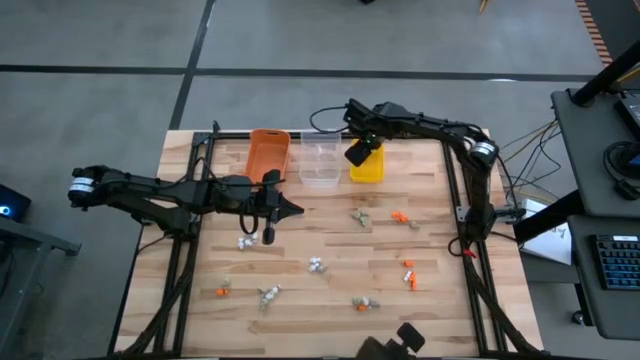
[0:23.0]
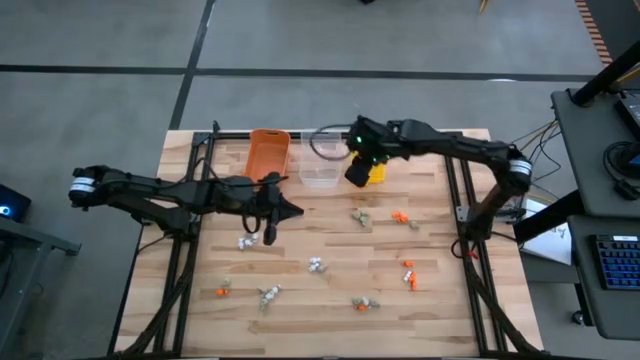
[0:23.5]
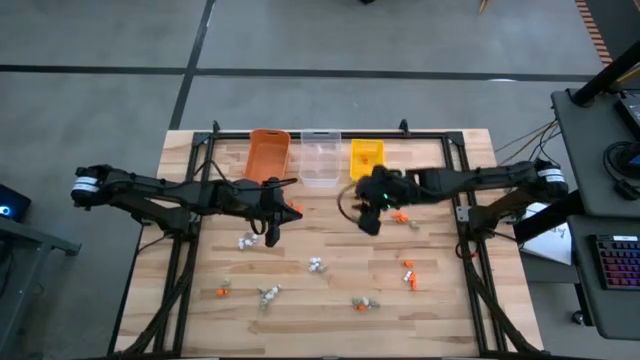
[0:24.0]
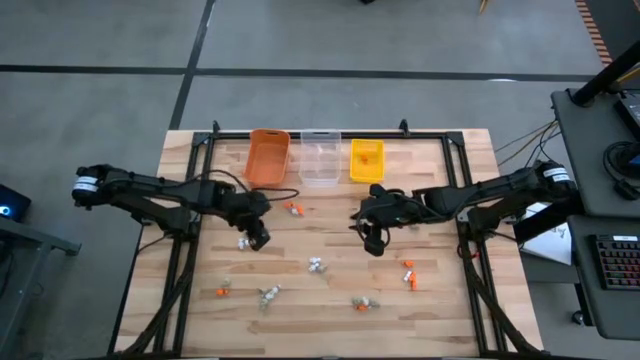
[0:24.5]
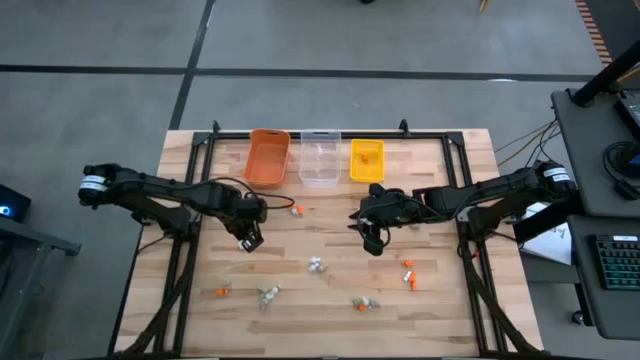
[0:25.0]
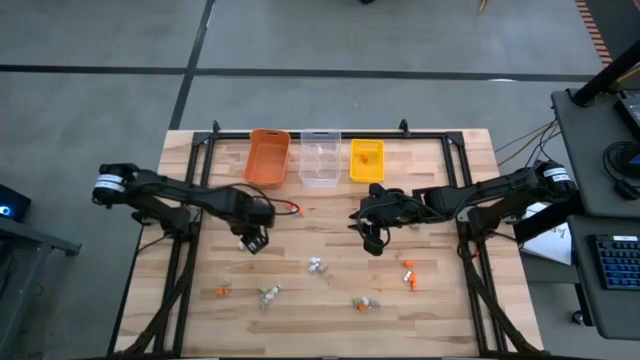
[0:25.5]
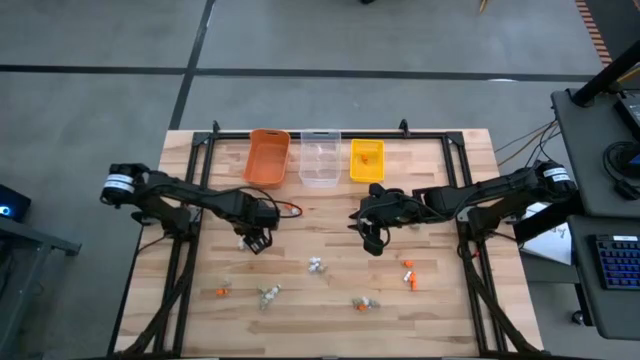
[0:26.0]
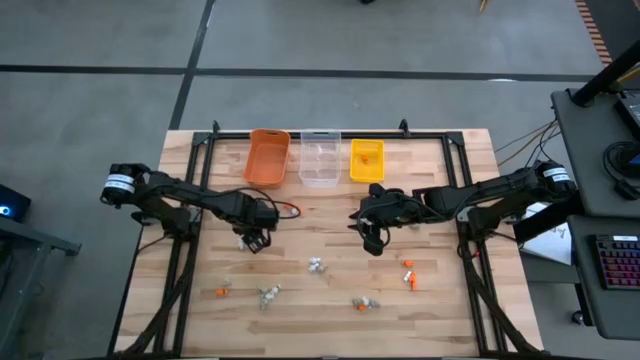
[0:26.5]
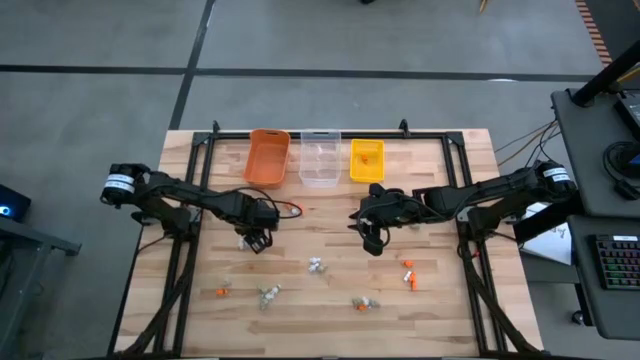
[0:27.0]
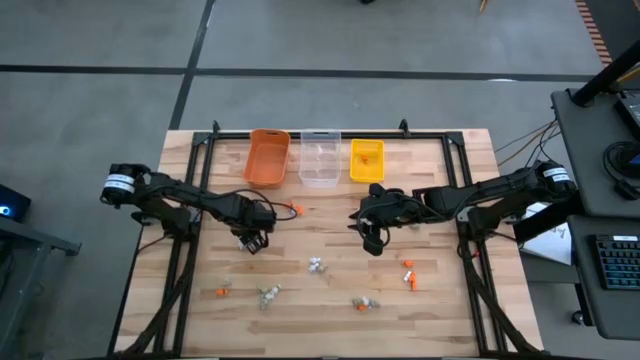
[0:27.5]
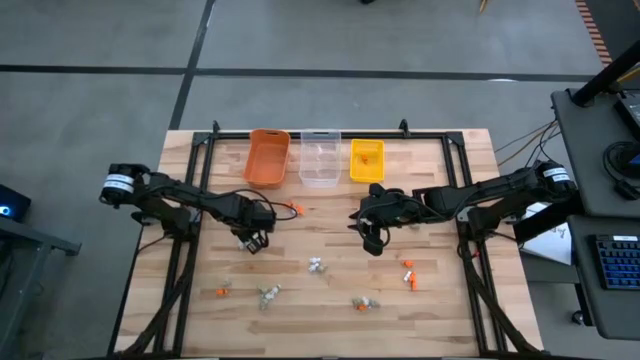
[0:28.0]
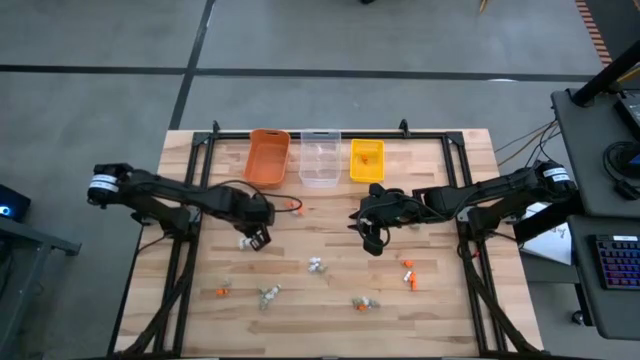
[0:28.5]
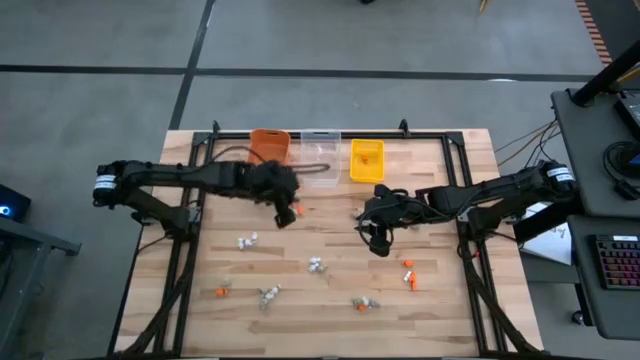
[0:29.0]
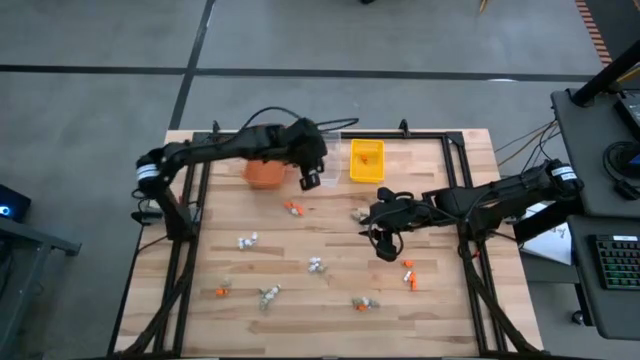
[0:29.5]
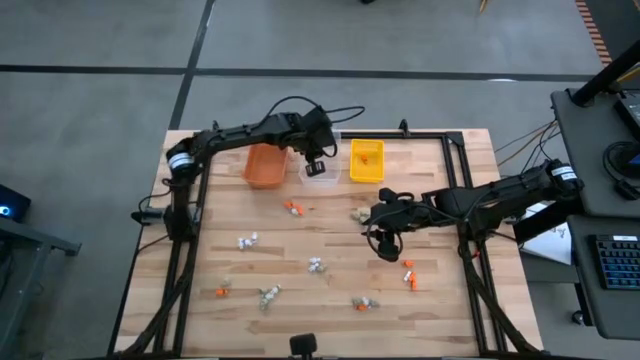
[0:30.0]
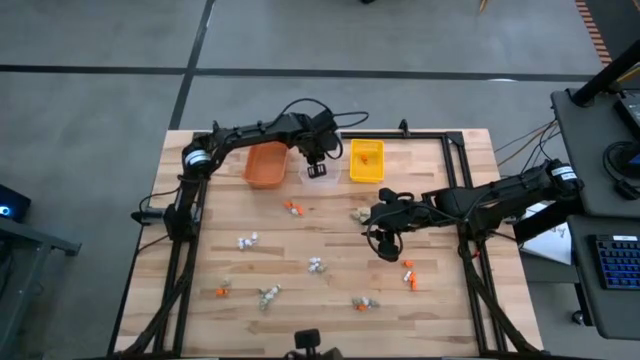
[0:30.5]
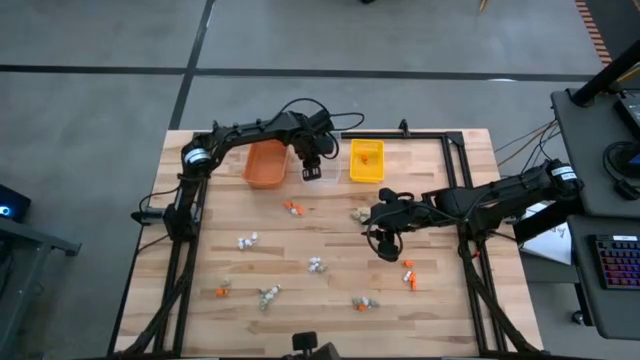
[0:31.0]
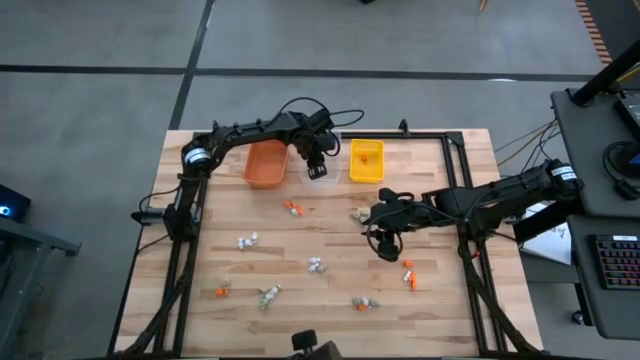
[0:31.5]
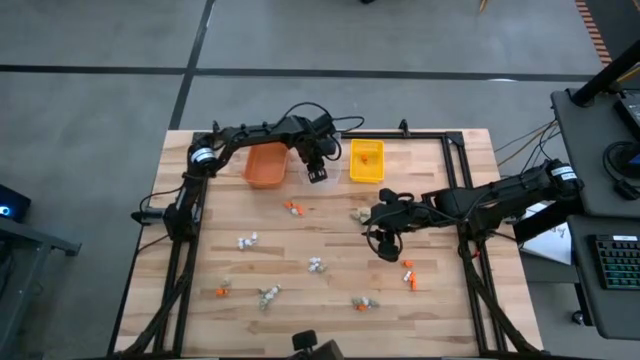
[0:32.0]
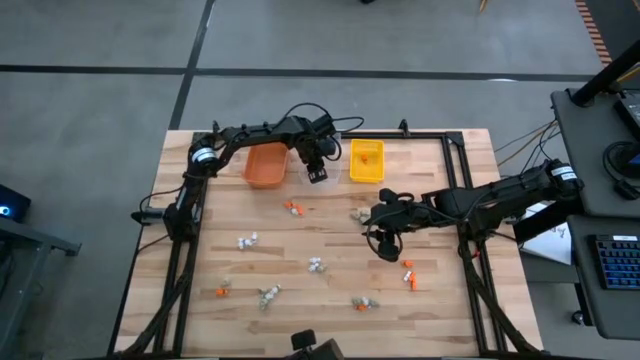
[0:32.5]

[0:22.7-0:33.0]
Task: Sort Halloween decoration
Put the gray skull toy into the transparent bin

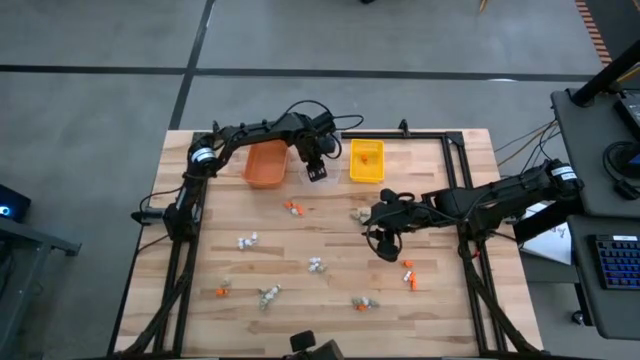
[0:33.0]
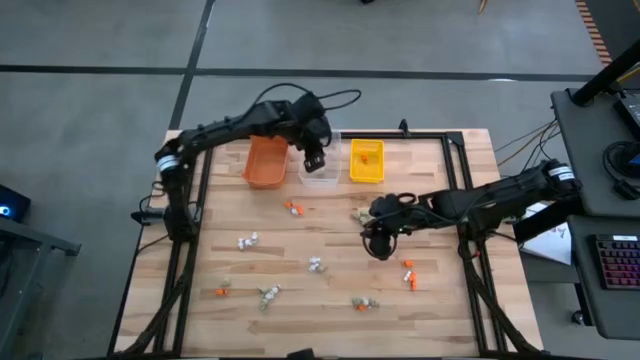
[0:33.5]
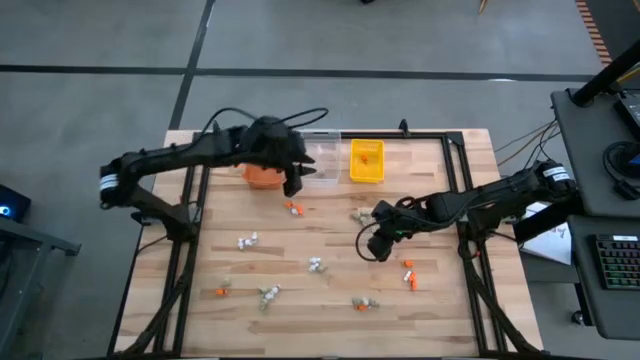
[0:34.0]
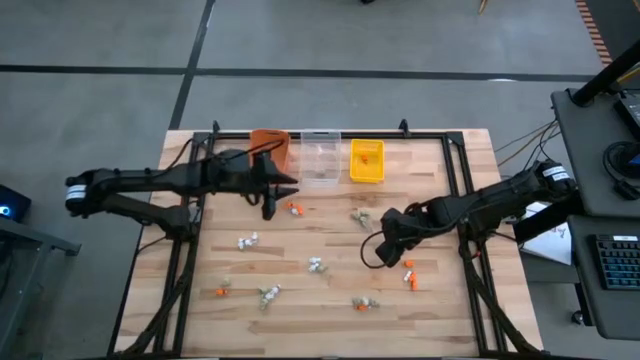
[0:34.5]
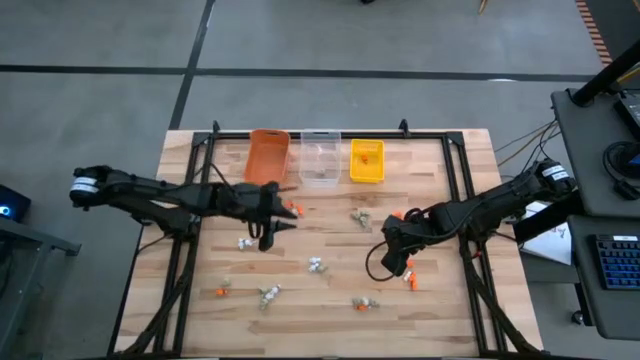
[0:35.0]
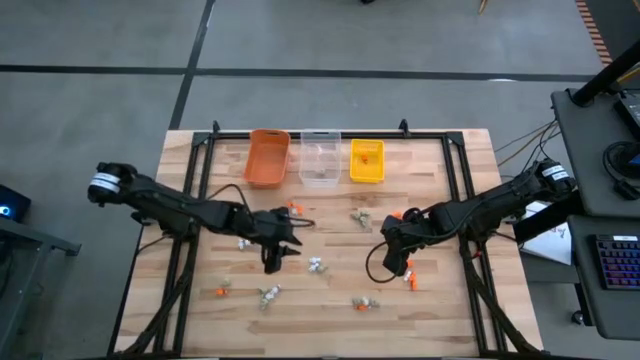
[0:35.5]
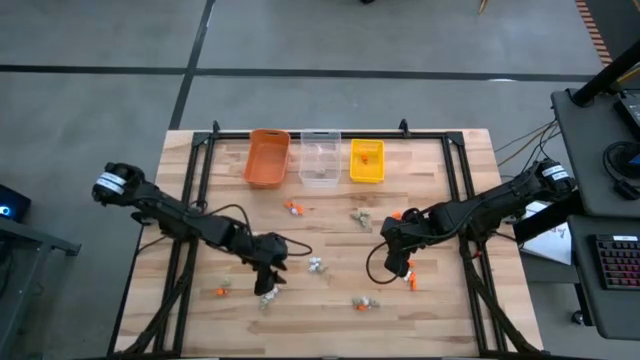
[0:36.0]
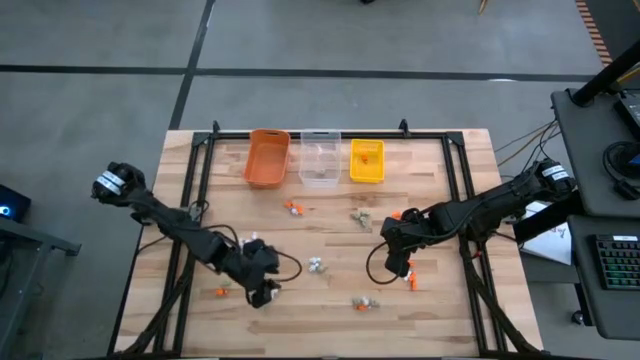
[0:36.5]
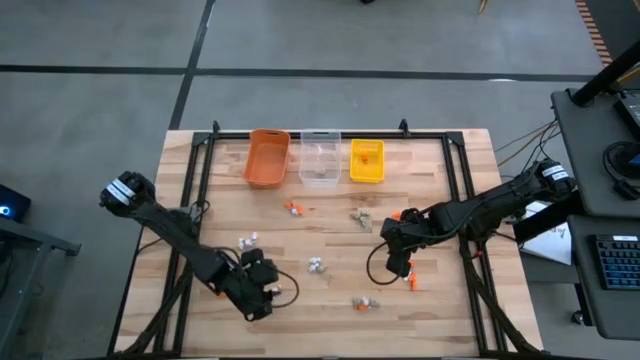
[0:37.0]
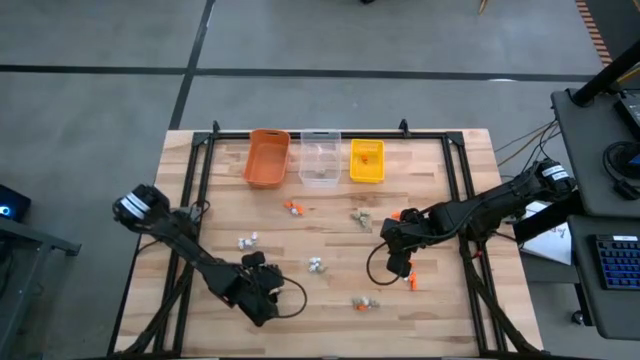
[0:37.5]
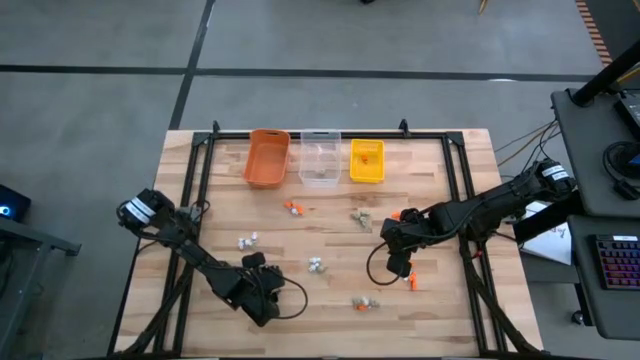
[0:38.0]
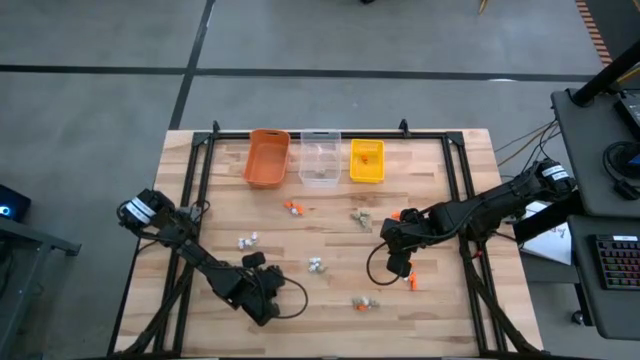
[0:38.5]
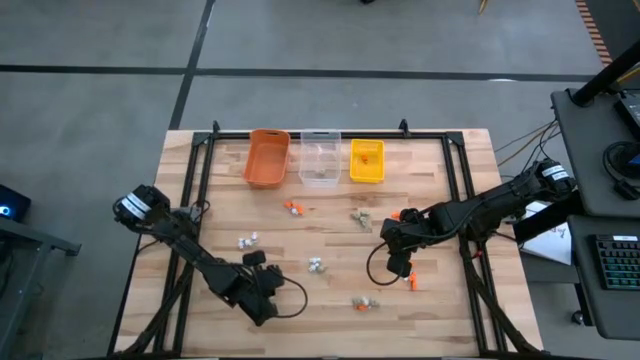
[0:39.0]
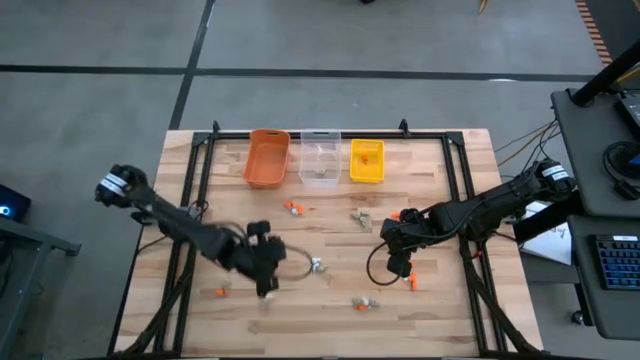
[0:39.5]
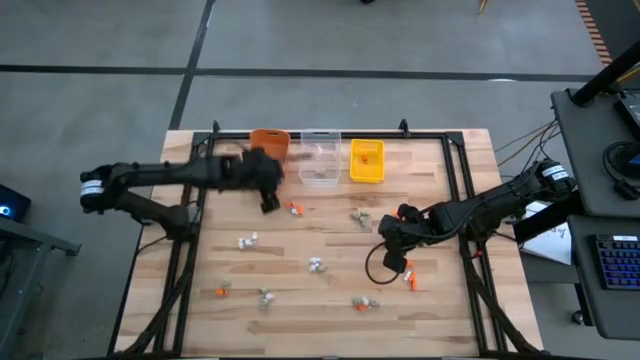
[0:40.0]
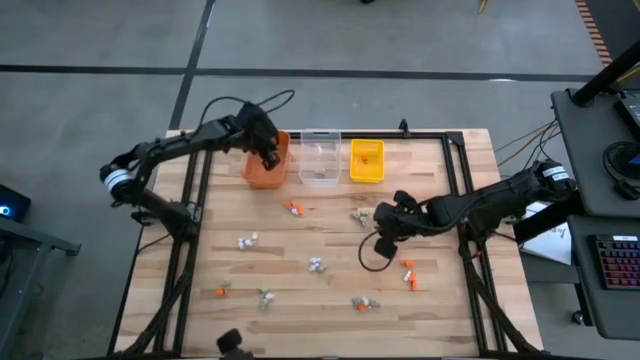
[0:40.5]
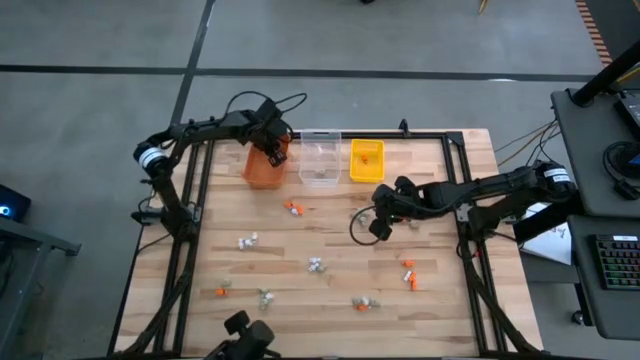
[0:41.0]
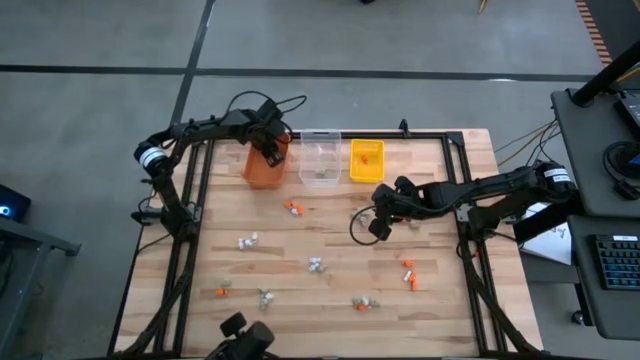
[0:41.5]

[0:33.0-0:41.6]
Put the white skeleton toy into the orange bin
